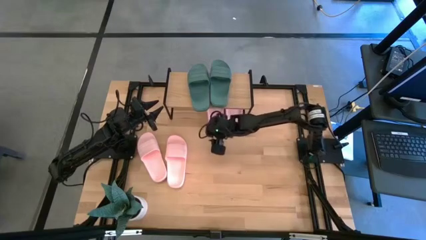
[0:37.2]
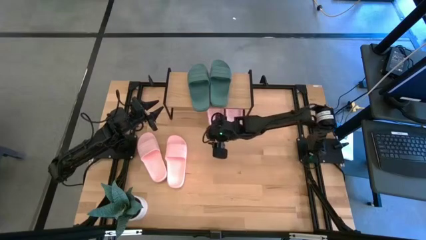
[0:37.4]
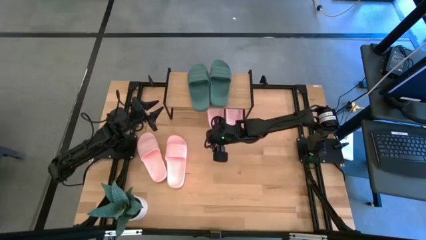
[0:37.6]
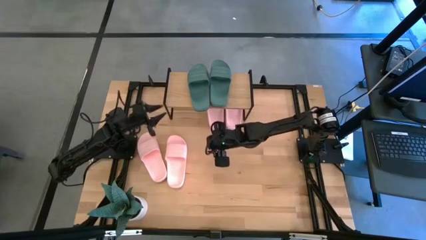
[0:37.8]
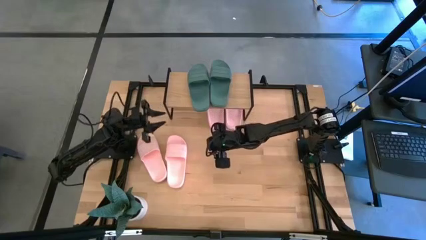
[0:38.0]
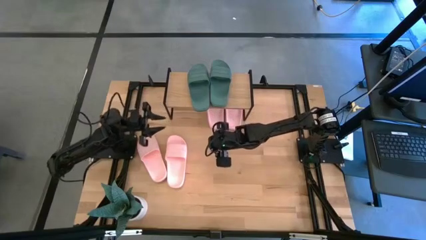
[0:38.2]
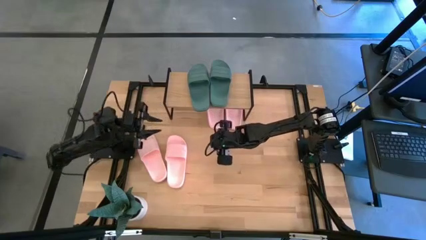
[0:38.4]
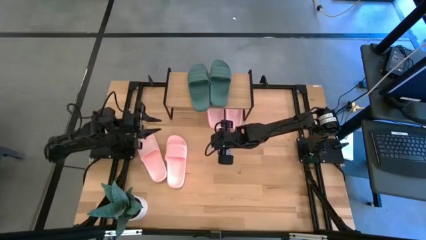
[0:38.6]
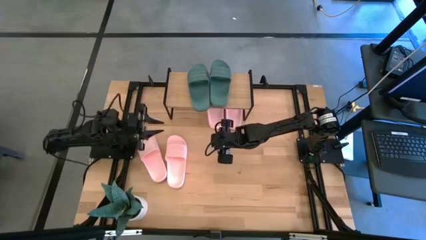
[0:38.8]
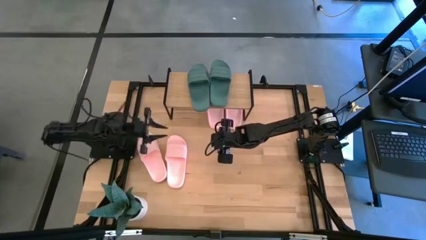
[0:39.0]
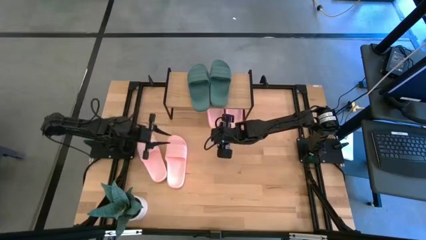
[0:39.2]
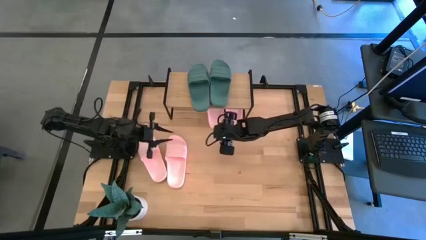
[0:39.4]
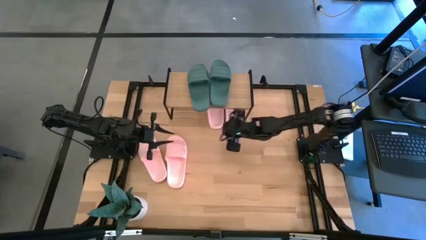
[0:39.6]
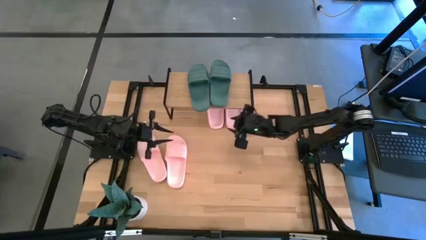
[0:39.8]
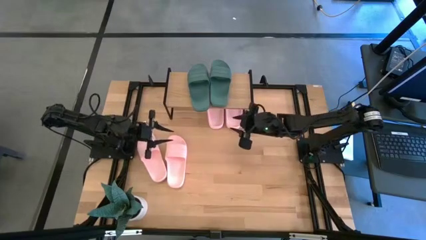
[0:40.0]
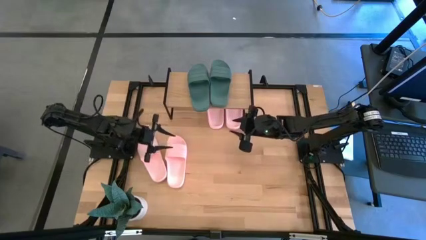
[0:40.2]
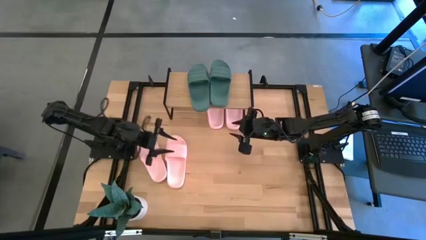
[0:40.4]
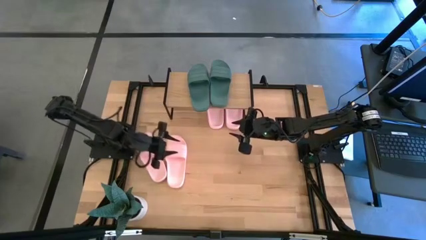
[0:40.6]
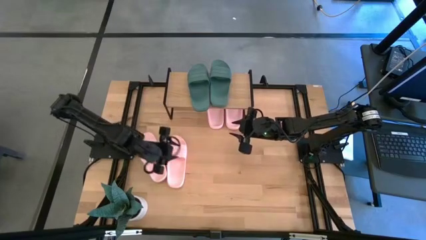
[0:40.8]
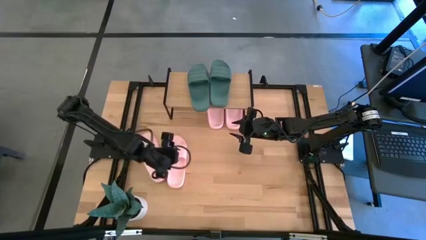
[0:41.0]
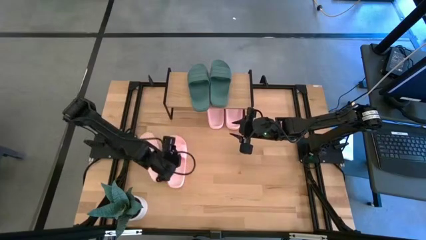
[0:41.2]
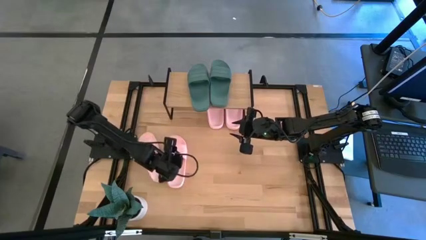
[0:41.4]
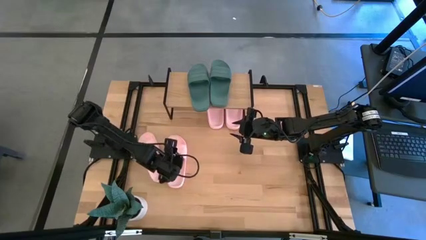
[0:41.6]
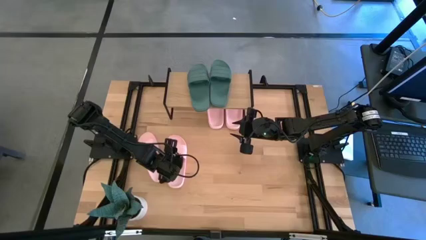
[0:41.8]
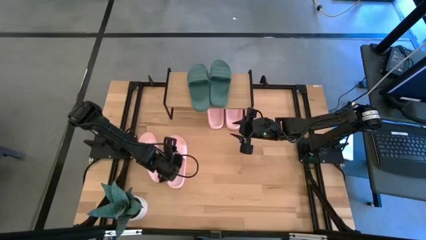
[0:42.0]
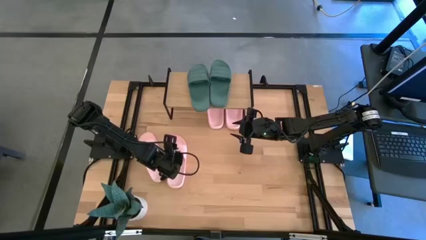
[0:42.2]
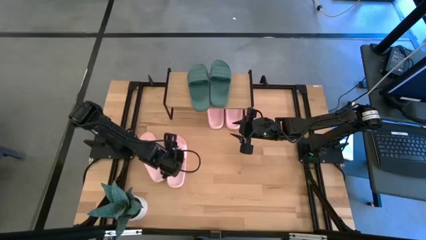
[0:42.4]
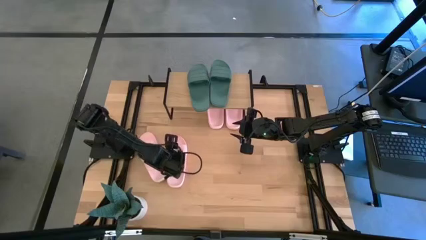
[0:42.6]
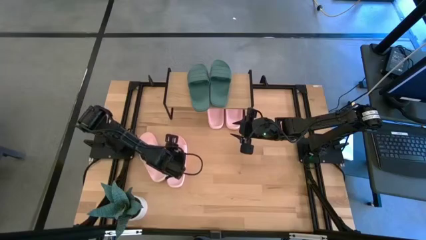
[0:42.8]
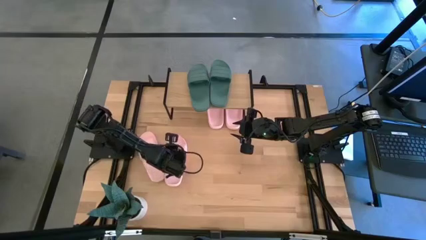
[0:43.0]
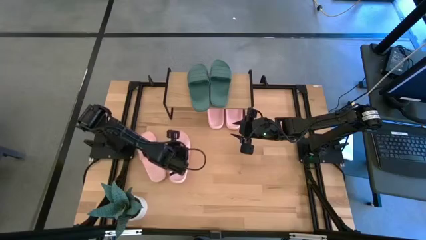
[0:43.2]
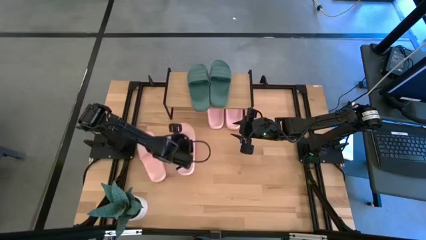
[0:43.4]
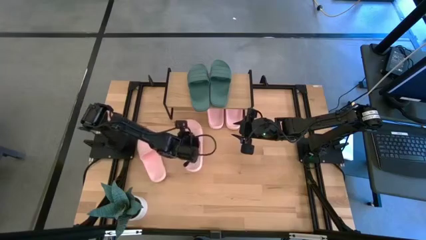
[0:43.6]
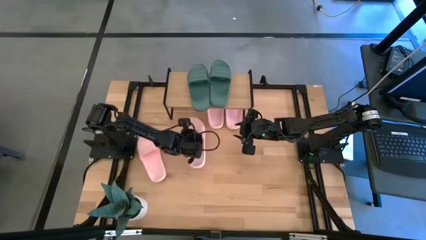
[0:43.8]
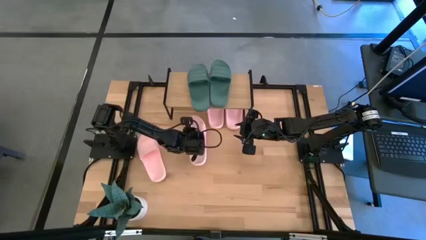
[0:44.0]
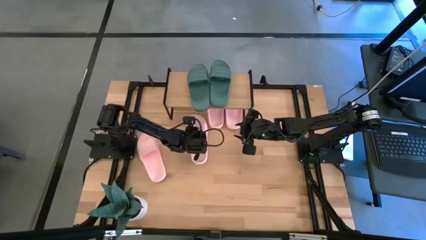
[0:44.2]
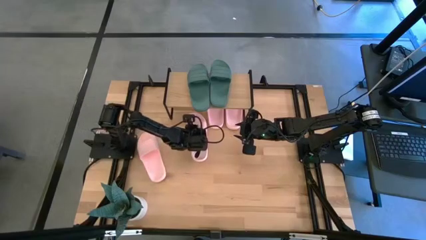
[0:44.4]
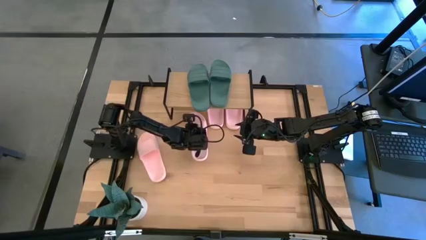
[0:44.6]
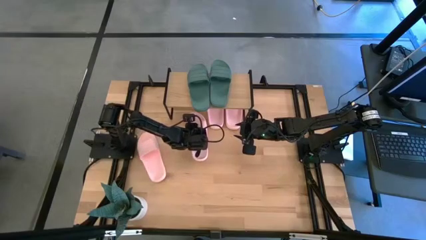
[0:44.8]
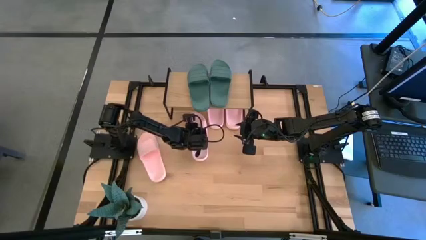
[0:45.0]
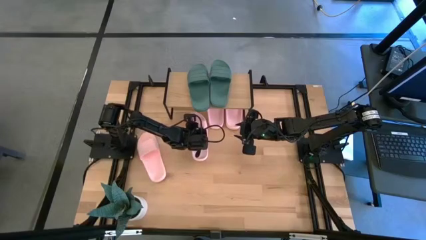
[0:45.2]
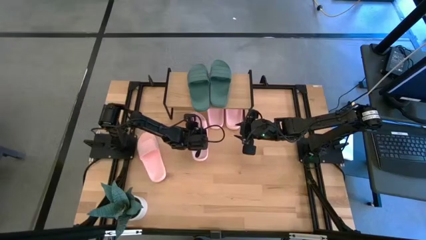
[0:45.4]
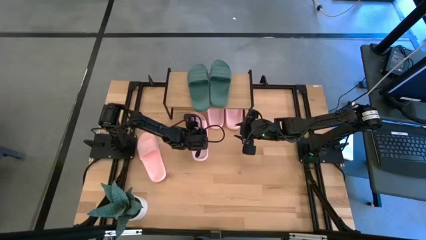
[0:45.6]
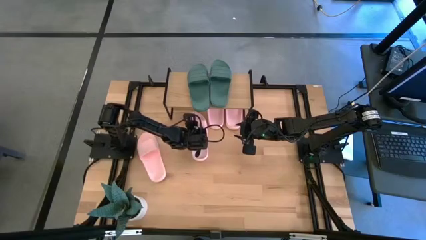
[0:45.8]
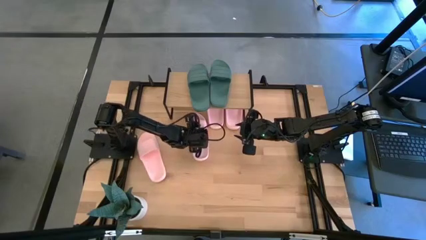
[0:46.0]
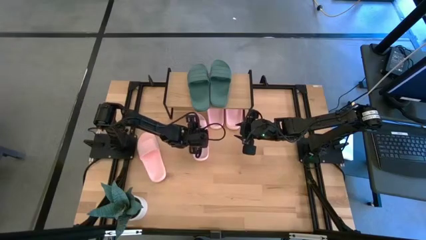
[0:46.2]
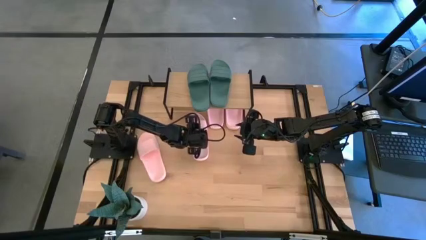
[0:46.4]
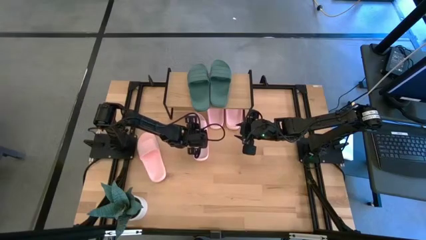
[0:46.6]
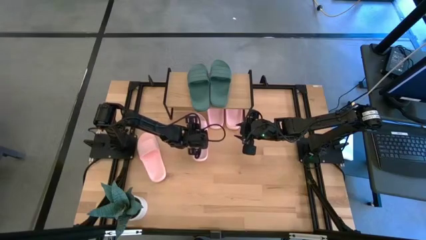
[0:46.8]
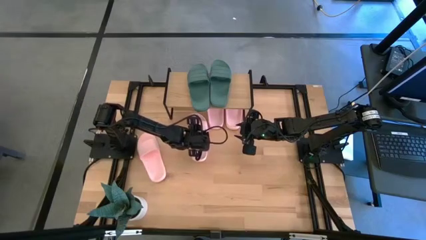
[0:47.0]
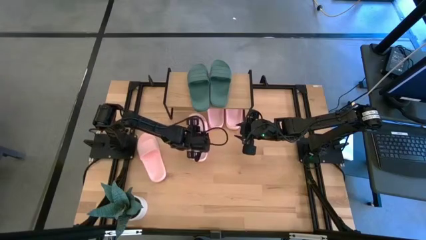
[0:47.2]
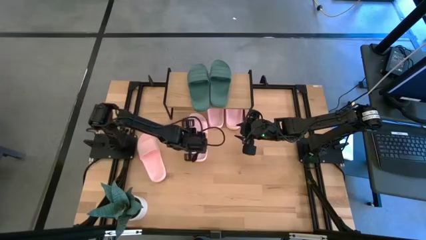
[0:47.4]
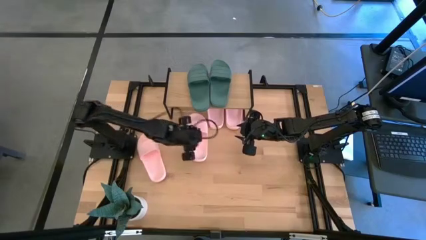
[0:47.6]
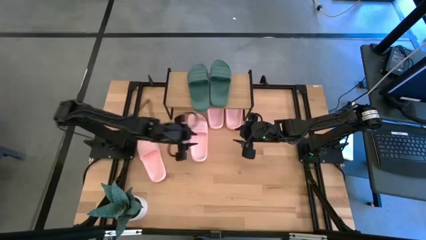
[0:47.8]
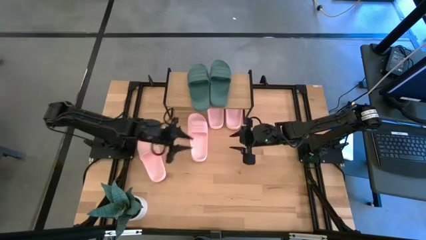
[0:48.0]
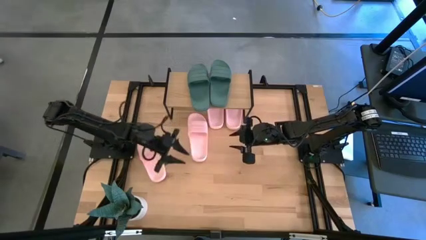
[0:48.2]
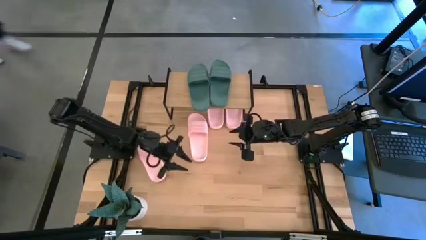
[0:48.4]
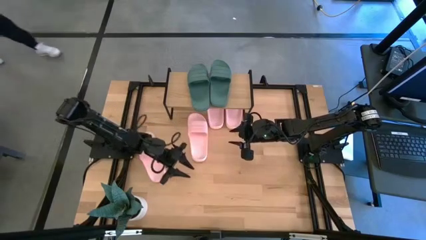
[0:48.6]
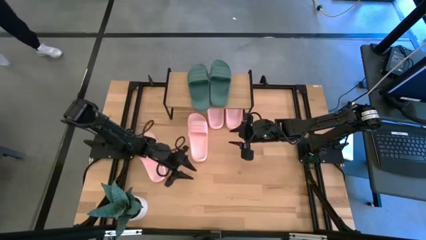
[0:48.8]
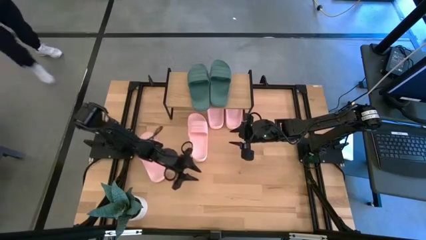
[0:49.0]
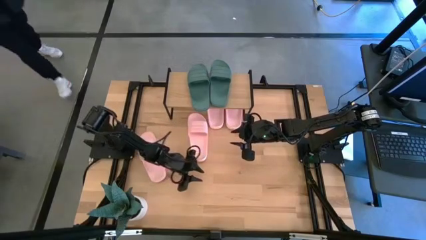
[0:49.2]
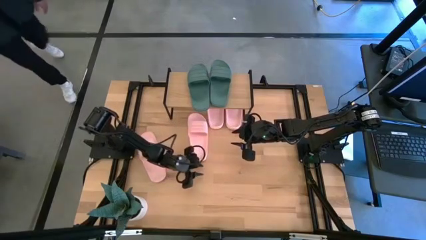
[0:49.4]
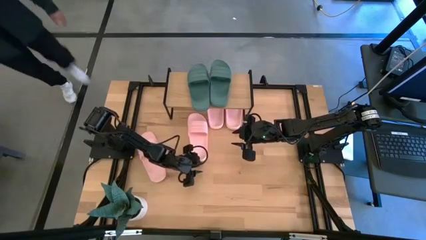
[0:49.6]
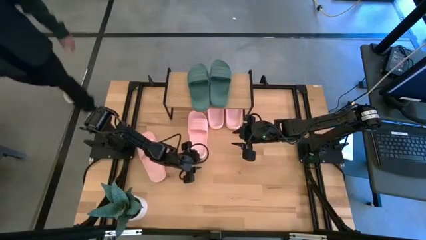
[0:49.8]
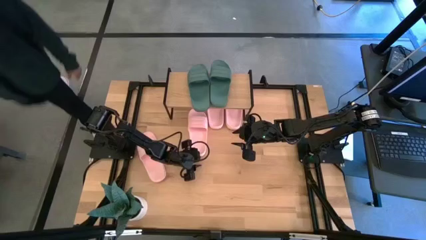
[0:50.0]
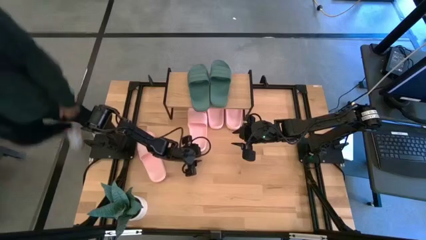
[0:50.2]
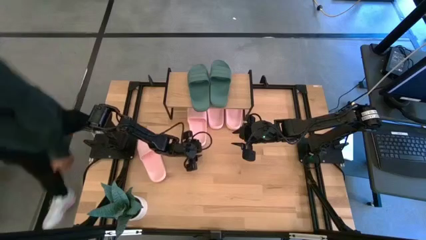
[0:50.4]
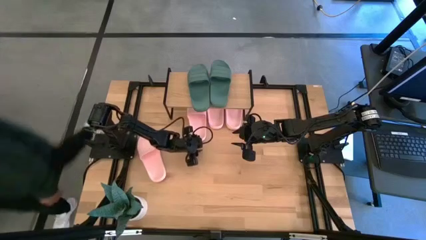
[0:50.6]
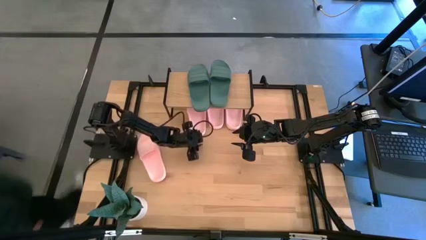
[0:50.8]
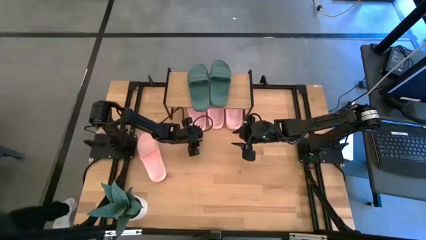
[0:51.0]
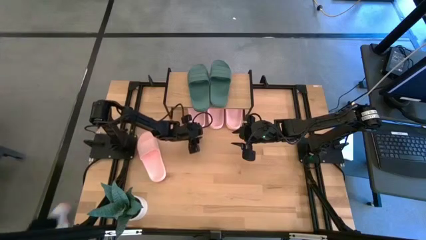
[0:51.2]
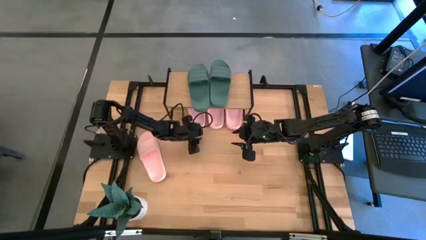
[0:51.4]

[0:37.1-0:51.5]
Task: Pick and place slides into the shelf
Put the pink slipper under the shelf

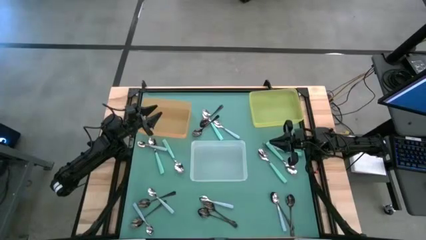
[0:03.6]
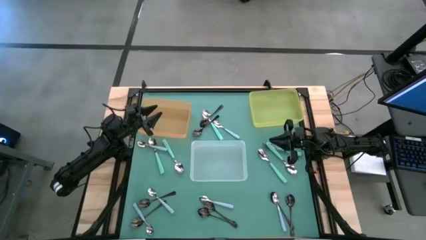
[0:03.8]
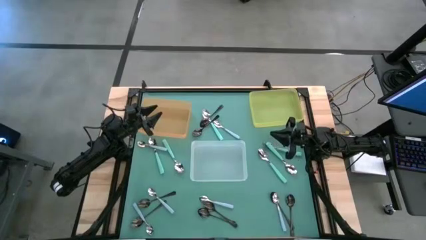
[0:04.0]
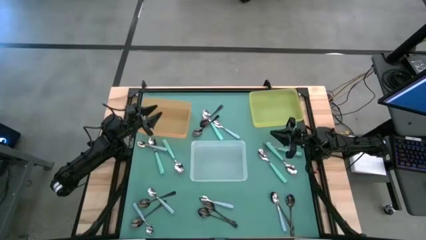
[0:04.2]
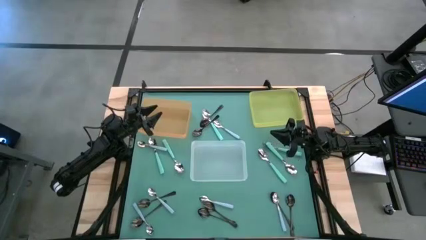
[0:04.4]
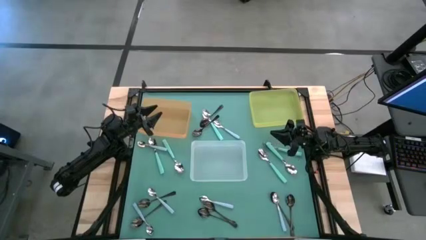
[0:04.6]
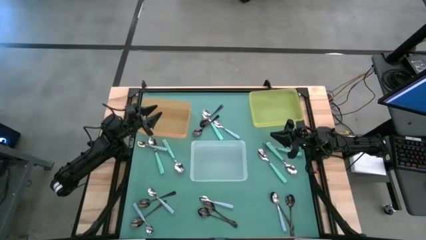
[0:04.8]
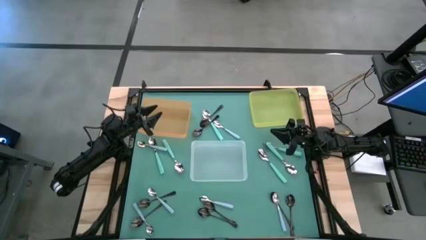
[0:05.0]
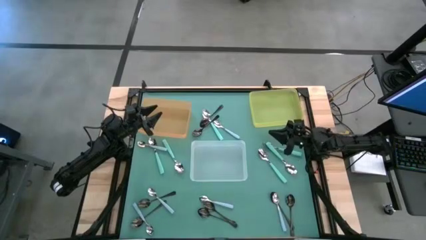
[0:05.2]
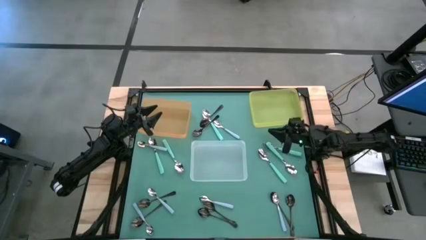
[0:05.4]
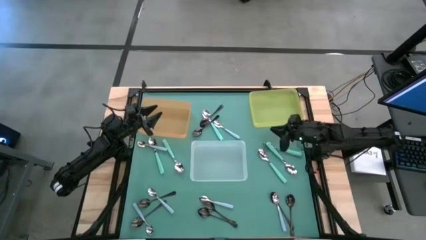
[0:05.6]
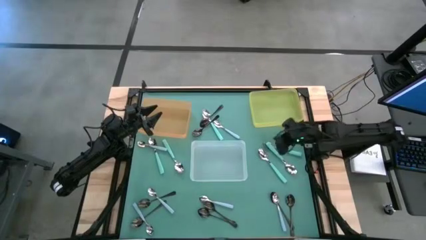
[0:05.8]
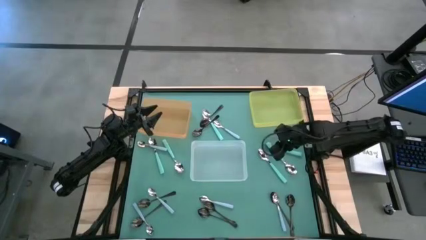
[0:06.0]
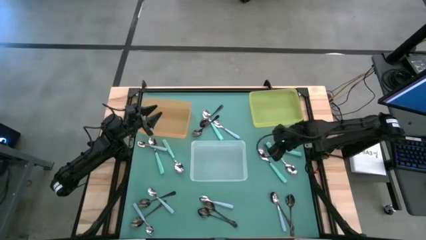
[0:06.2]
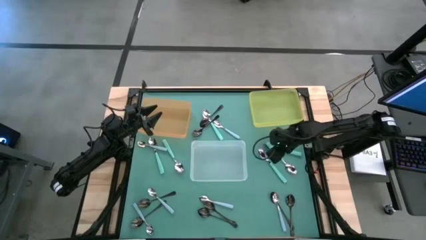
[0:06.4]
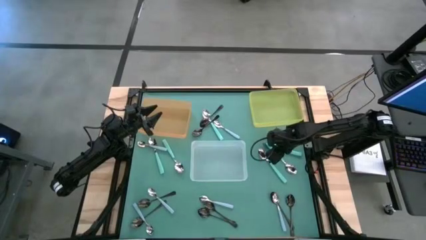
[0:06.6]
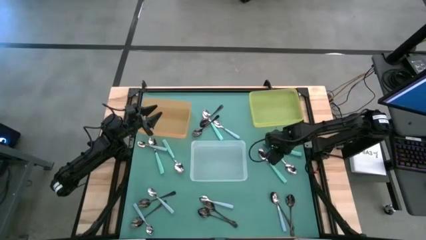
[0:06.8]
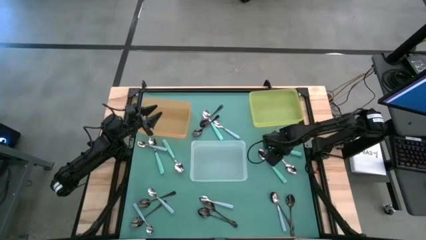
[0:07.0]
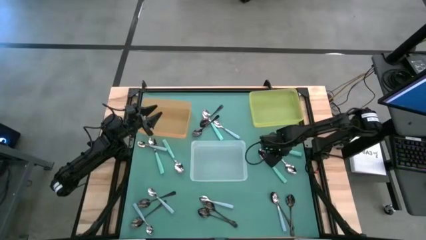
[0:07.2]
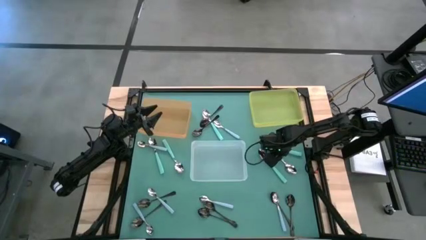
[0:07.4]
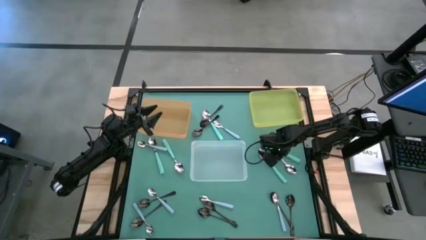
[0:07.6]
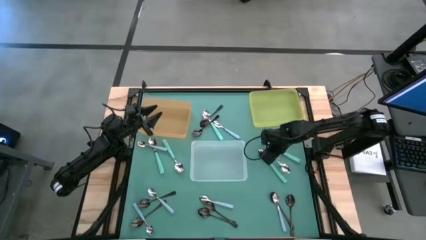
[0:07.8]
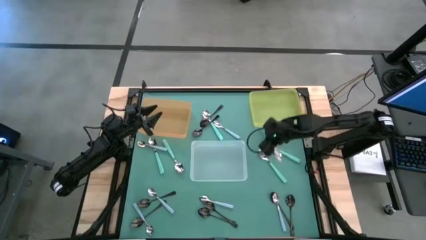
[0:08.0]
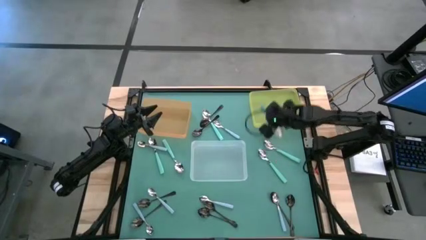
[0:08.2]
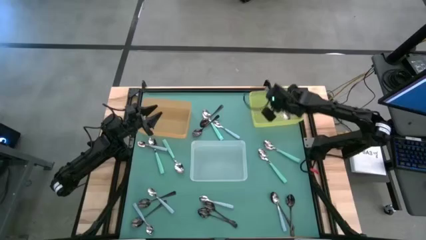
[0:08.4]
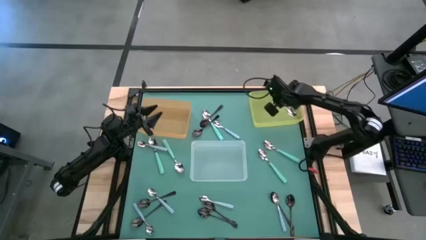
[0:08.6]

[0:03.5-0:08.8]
Task: Sort silverware by color (type)
Put the light blue spoon into the yellow bin
